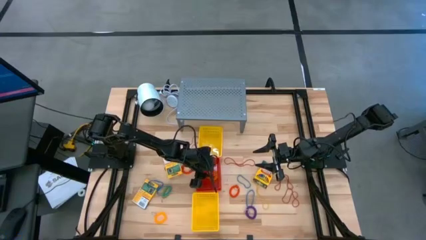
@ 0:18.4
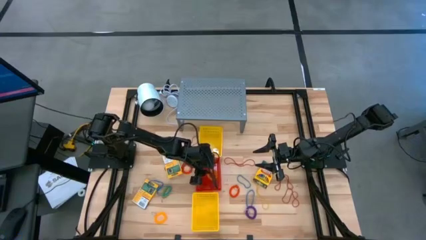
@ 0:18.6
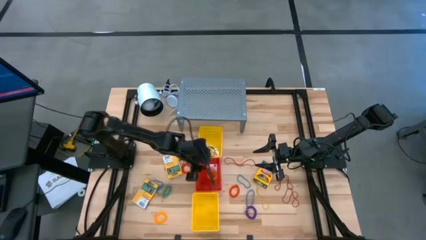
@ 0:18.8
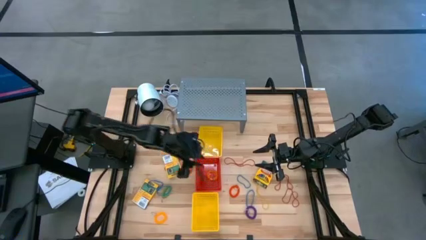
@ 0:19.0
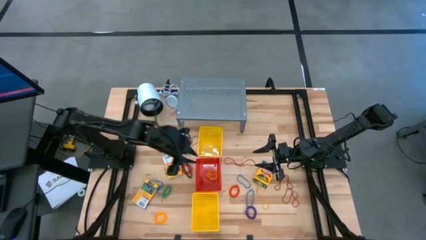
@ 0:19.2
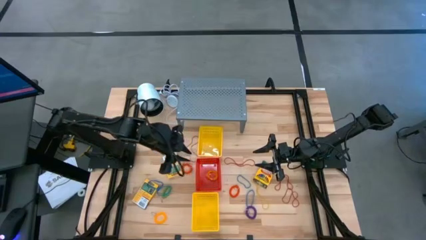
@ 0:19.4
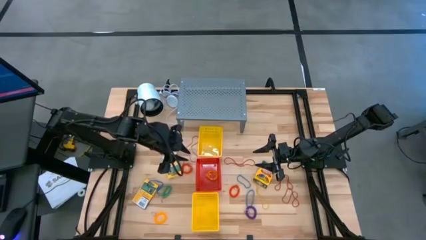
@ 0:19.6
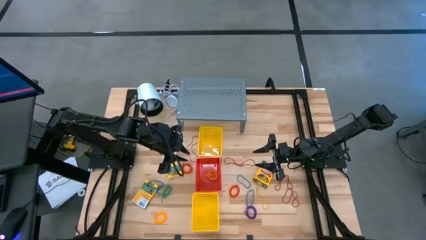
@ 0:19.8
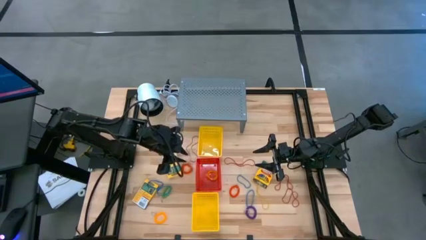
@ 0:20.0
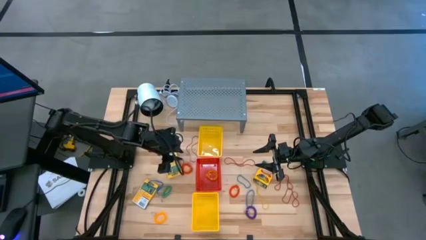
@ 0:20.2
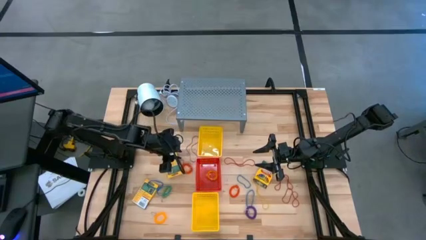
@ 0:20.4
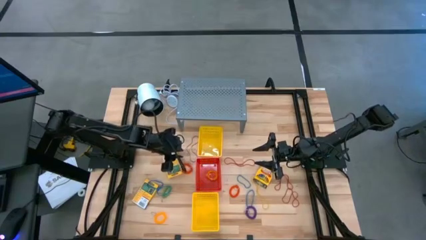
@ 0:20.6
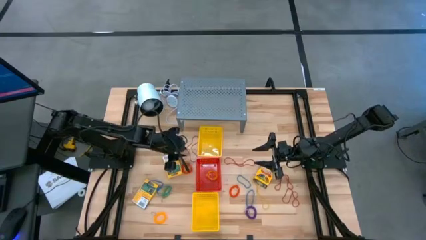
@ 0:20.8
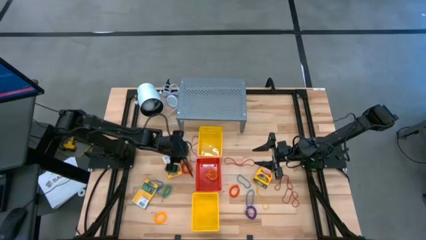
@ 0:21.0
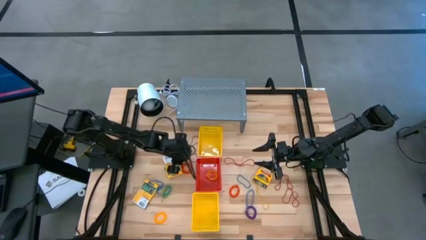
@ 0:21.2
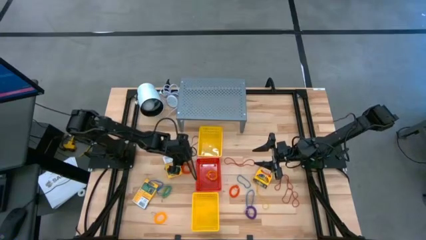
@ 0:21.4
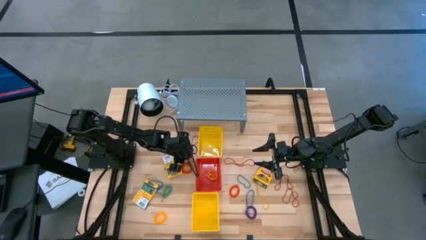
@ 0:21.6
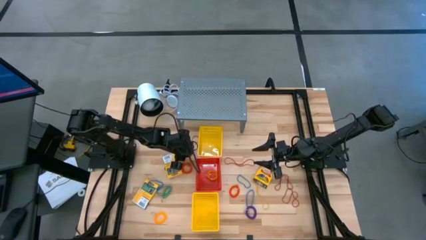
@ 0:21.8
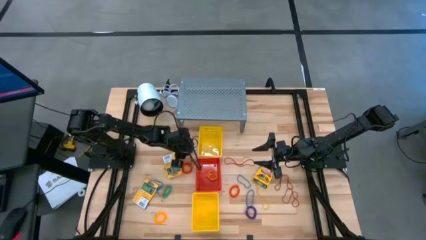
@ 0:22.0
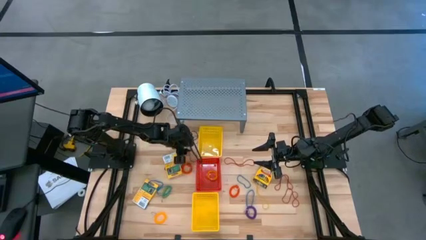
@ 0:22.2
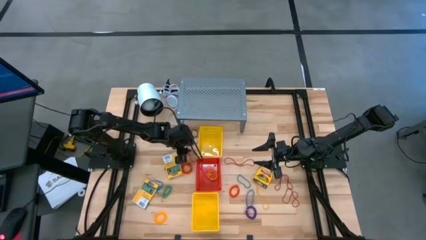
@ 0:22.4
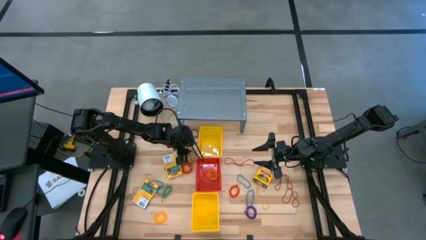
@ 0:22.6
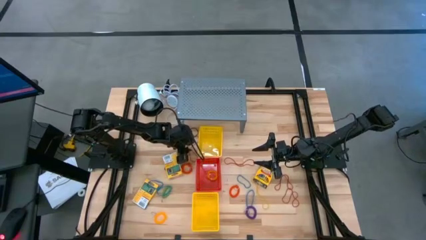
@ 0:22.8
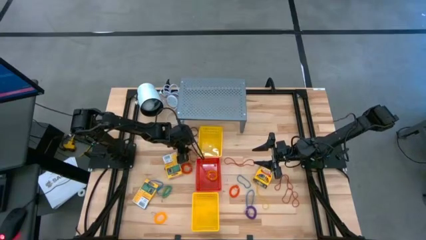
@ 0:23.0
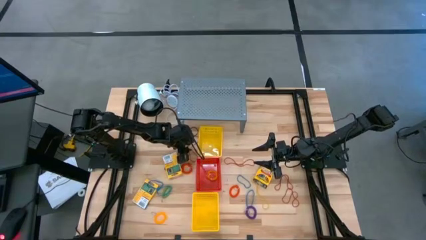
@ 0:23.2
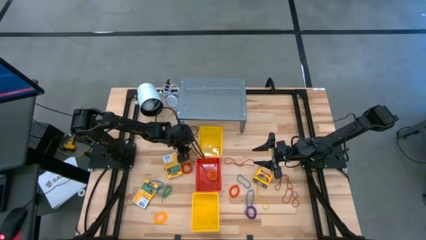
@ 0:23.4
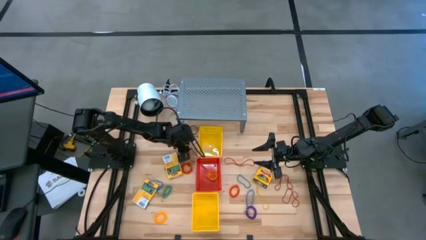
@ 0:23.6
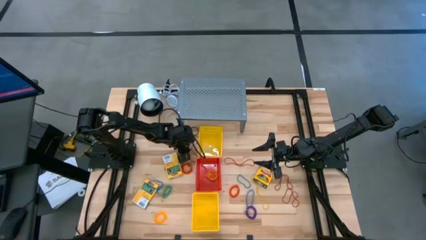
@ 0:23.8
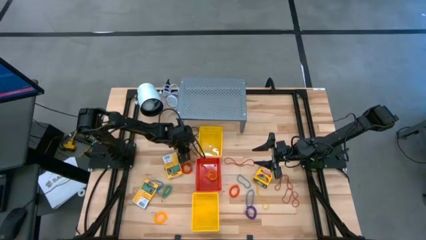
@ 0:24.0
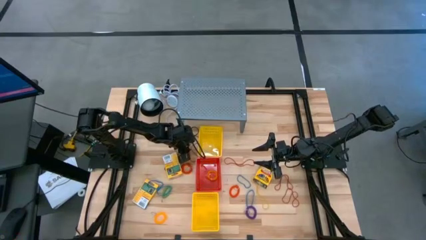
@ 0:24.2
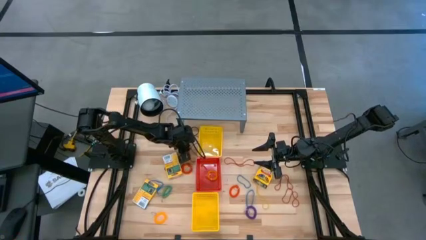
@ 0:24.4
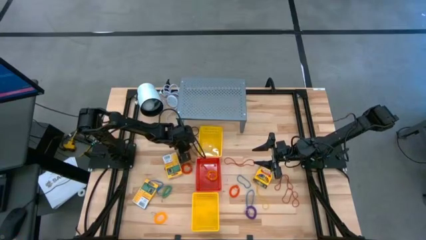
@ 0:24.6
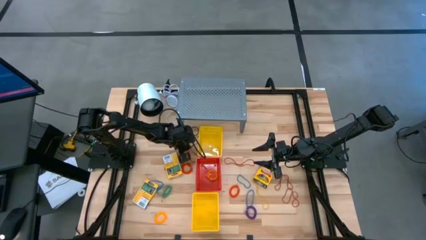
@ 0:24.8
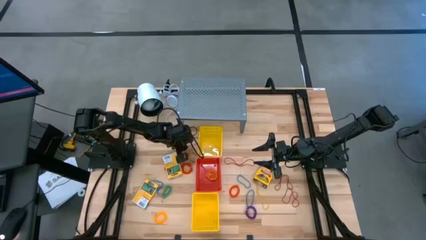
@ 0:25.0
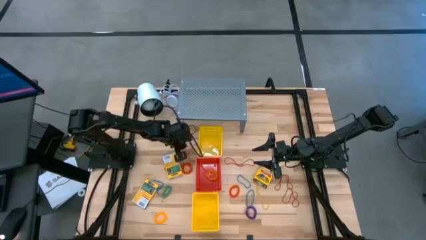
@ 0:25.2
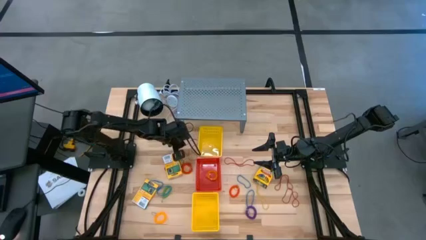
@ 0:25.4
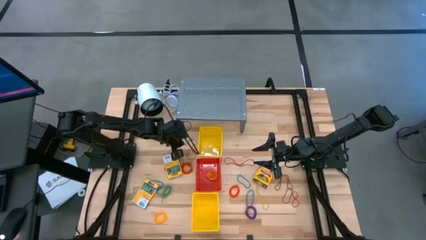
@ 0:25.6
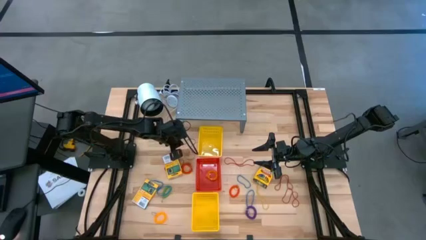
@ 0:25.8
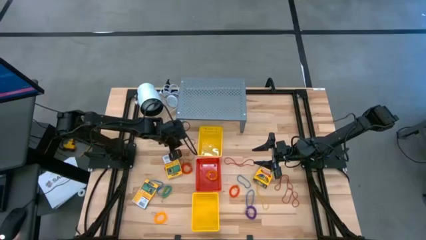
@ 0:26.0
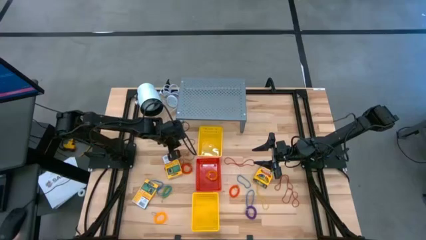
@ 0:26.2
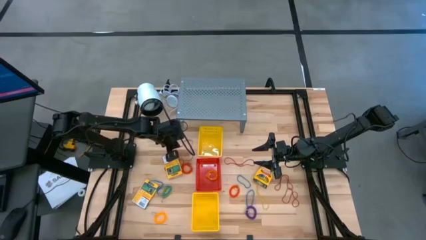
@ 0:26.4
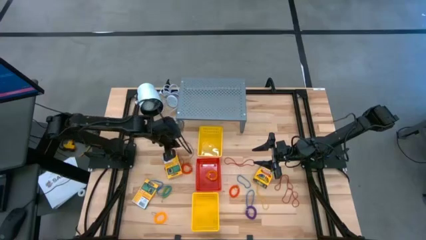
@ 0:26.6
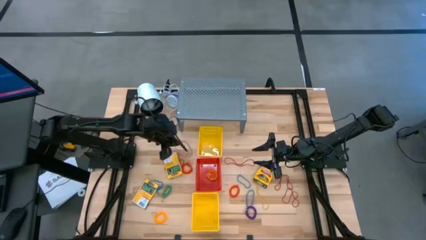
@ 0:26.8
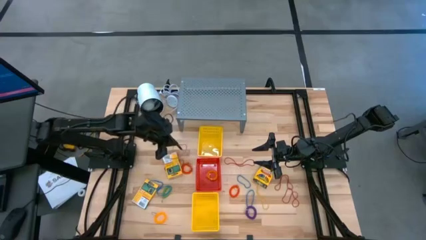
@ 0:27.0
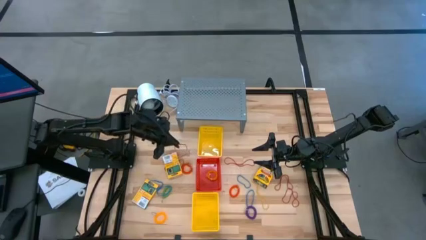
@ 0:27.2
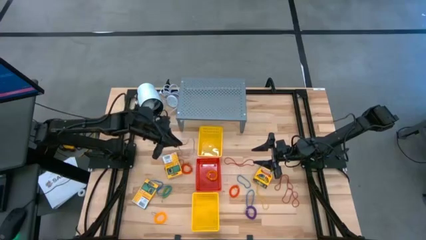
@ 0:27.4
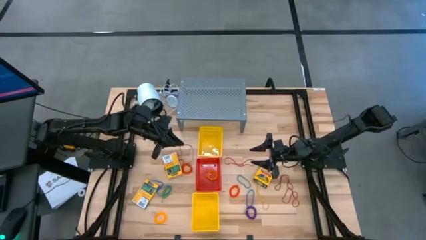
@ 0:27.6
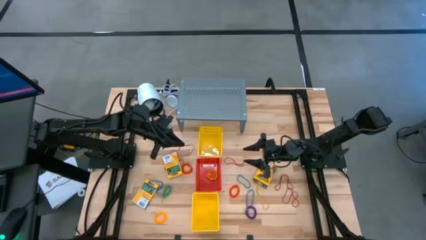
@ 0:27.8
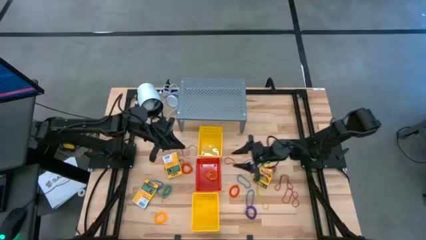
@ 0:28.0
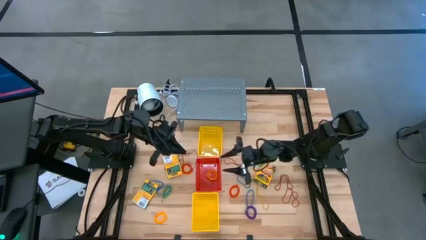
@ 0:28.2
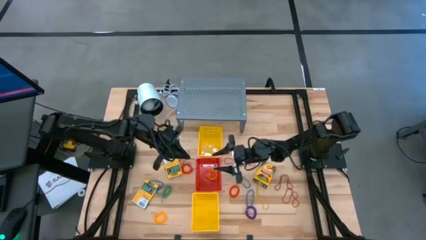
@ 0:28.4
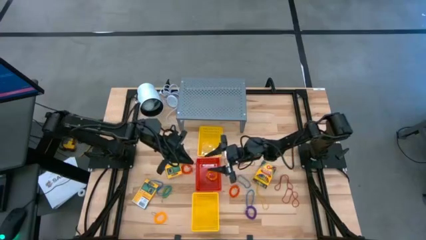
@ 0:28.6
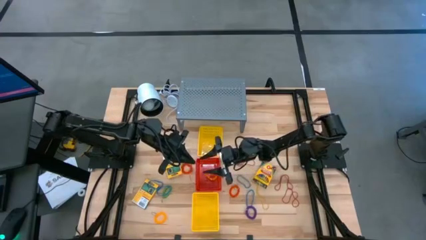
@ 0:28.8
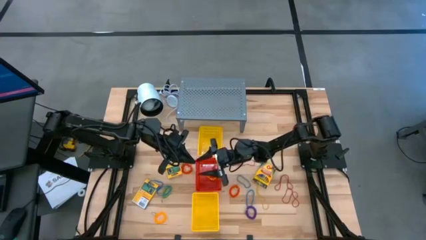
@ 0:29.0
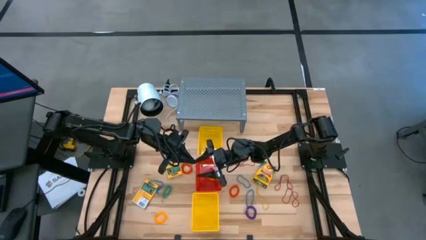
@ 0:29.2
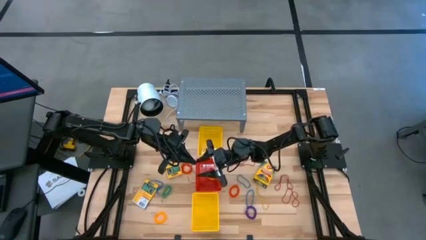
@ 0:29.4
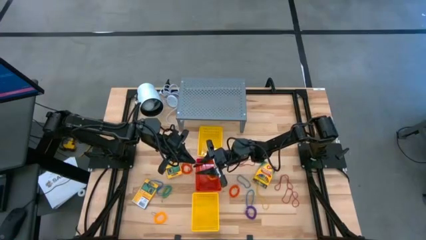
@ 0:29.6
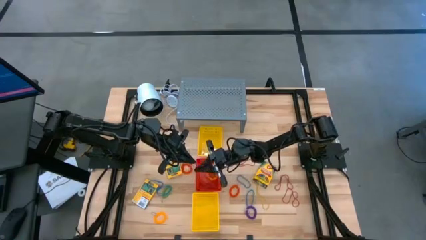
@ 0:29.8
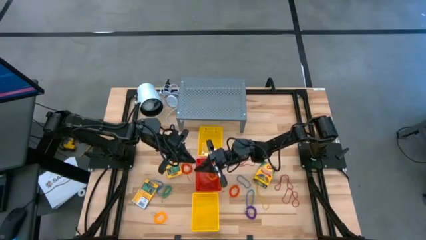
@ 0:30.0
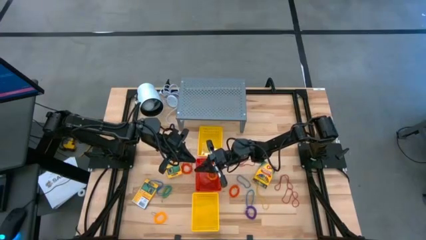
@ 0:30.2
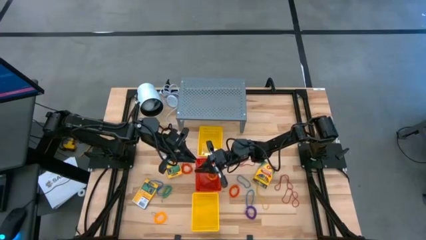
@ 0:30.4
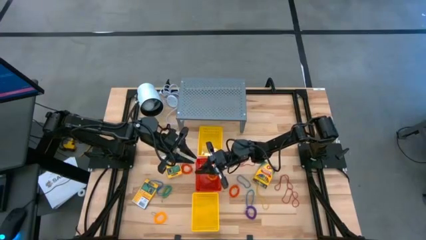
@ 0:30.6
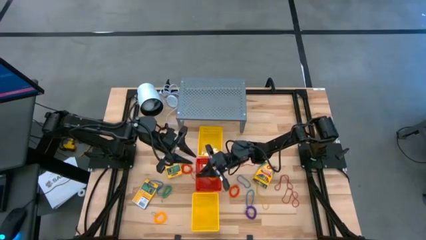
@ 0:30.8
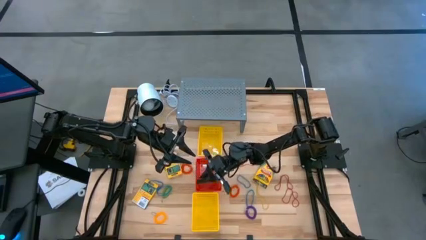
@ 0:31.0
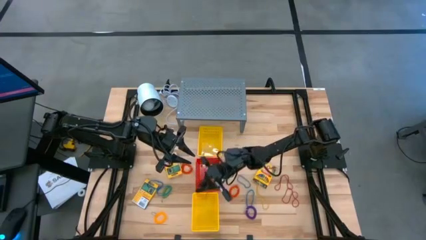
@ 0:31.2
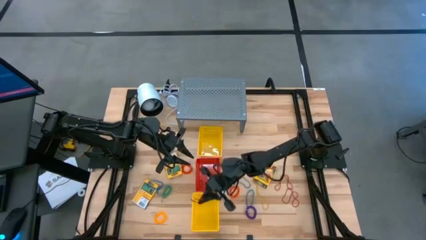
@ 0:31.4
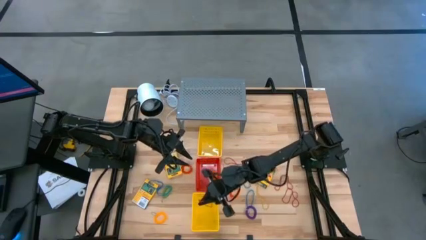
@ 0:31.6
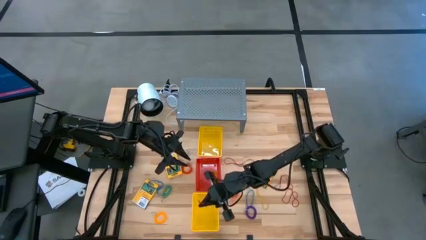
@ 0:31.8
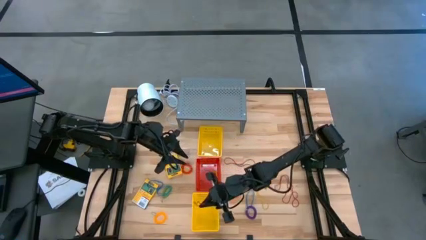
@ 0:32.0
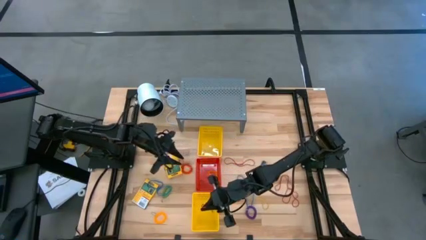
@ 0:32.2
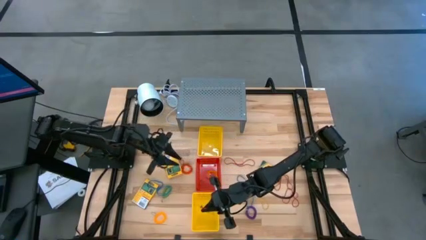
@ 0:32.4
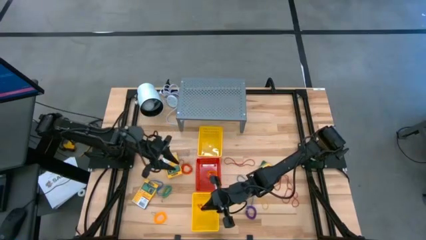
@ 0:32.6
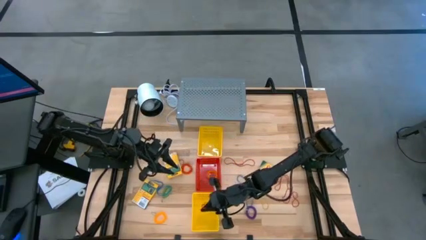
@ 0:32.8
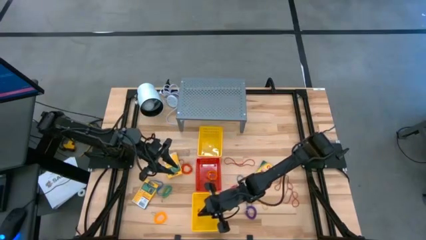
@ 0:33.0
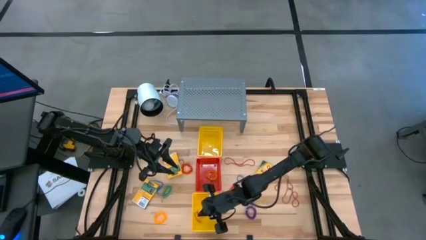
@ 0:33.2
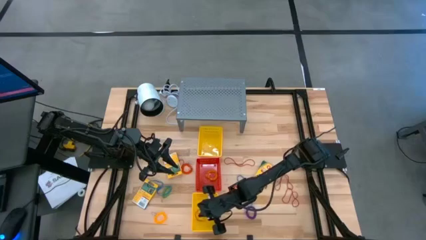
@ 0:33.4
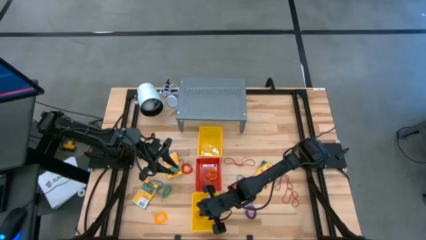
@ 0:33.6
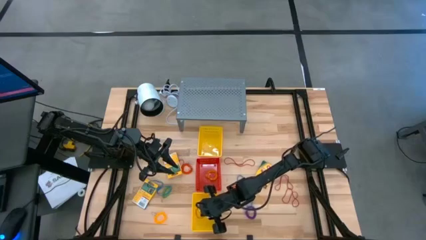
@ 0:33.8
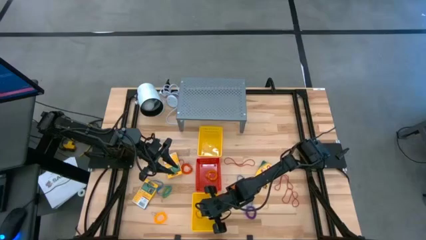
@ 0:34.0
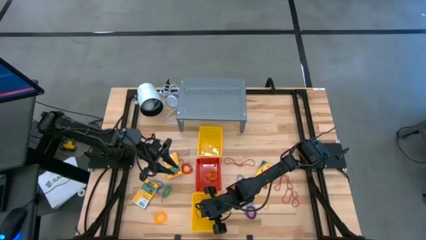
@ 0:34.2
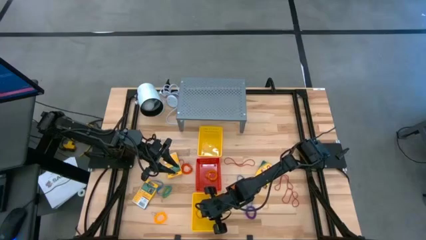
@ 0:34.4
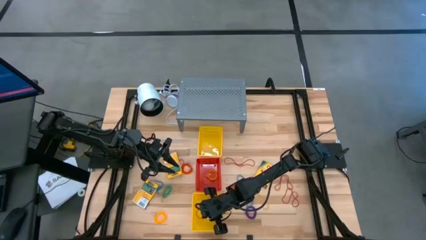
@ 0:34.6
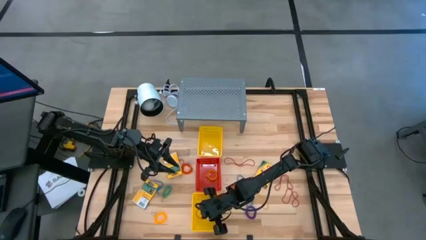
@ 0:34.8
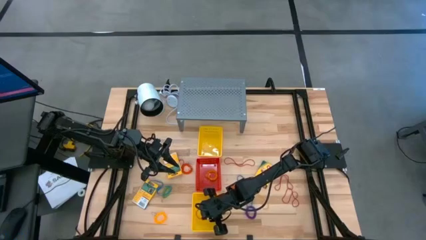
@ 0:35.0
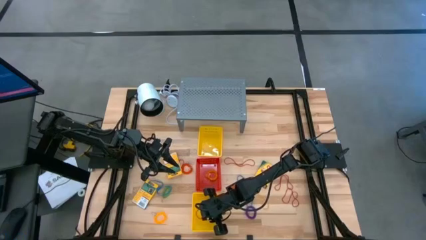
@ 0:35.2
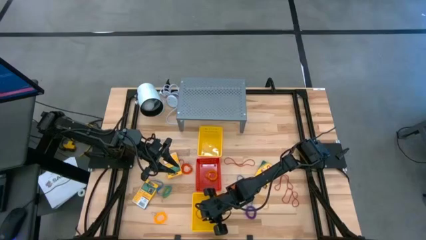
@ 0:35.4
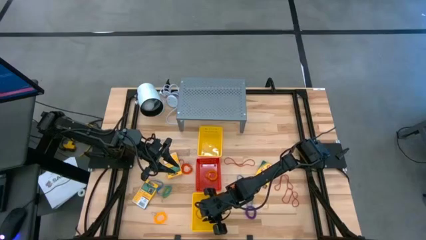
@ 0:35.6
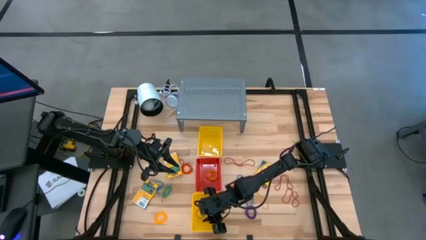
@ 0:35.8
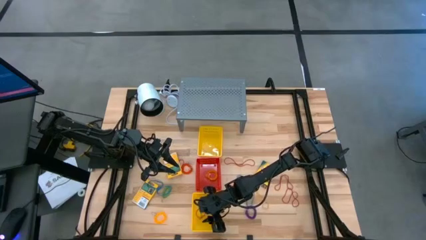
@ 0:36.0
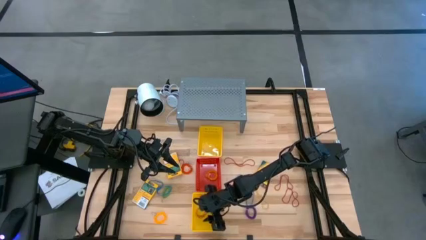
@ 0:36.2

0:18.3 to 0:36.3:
Task: Pick & Place Office Desk Supplies
Put the red rubber band into the bottom yellow bin
